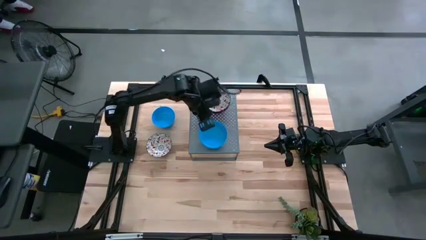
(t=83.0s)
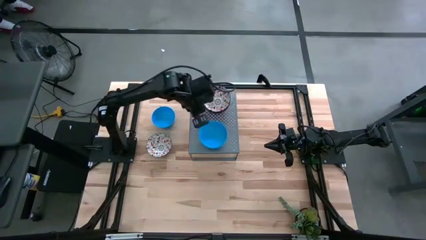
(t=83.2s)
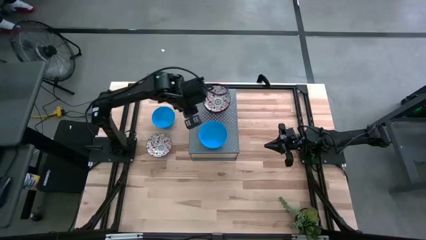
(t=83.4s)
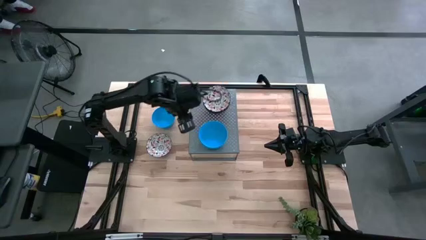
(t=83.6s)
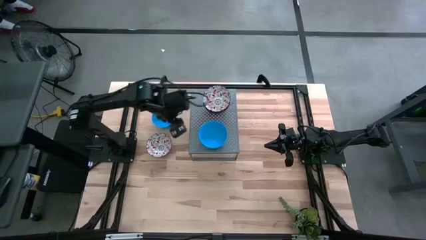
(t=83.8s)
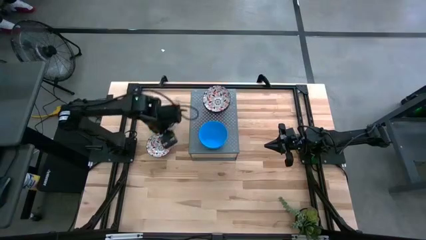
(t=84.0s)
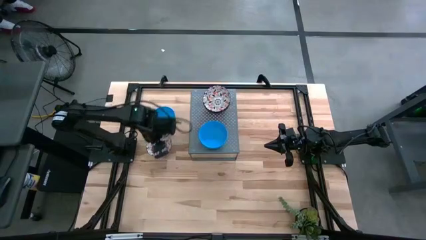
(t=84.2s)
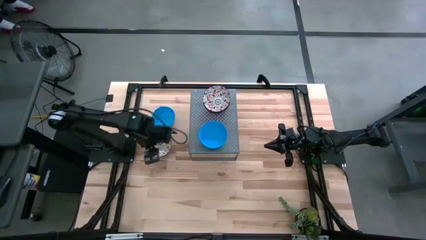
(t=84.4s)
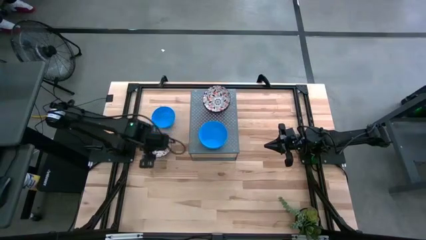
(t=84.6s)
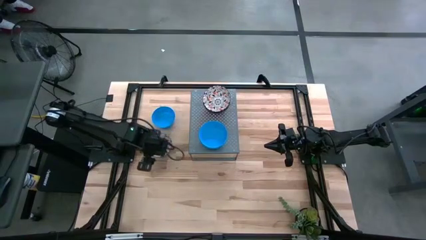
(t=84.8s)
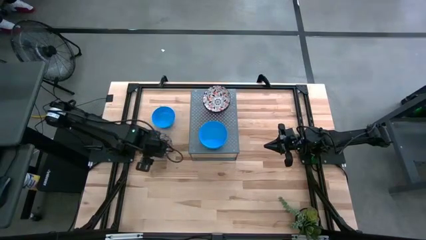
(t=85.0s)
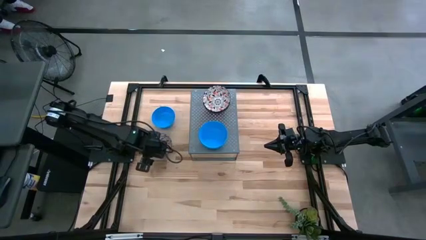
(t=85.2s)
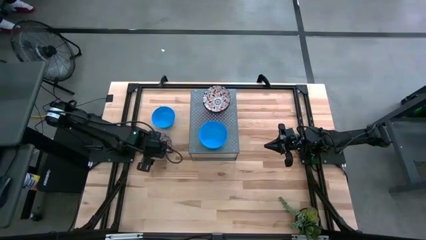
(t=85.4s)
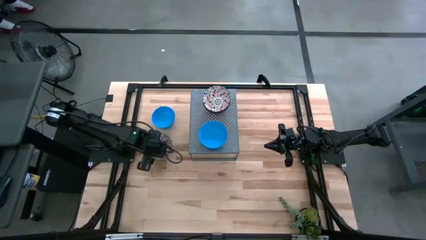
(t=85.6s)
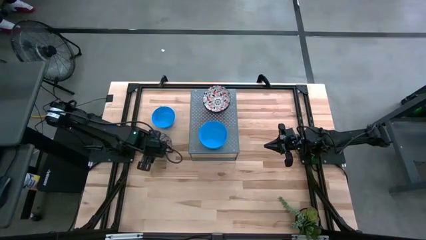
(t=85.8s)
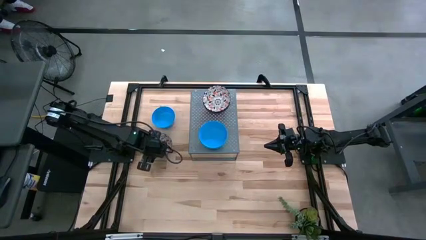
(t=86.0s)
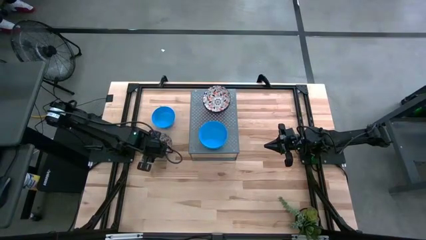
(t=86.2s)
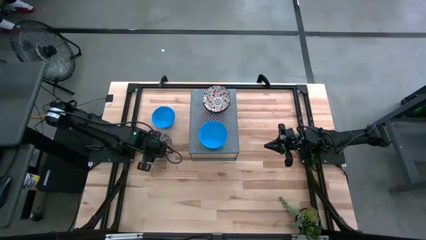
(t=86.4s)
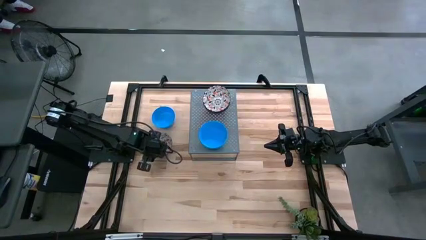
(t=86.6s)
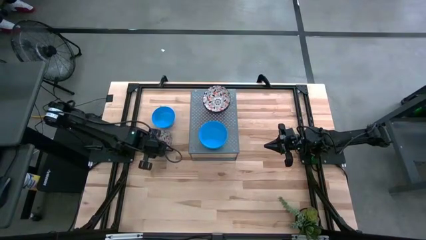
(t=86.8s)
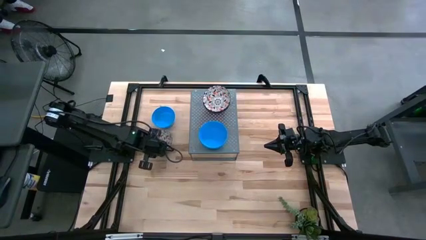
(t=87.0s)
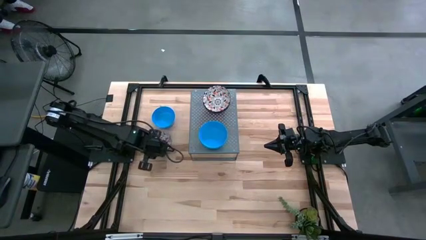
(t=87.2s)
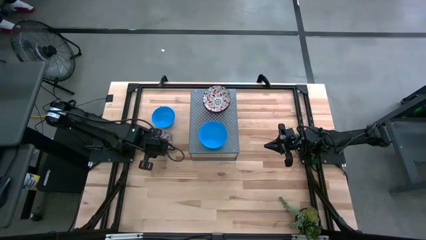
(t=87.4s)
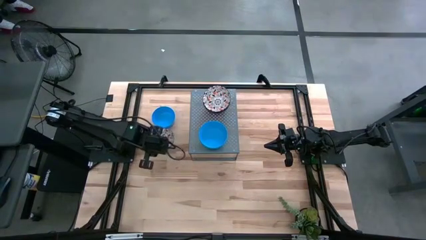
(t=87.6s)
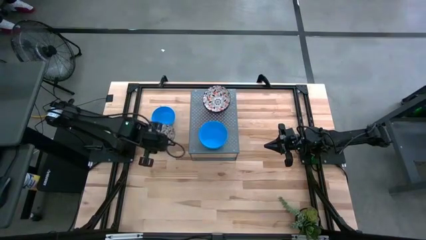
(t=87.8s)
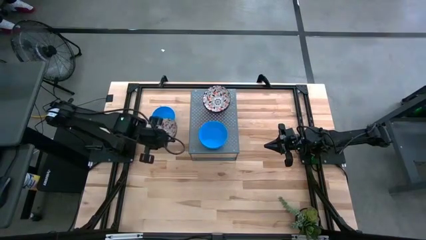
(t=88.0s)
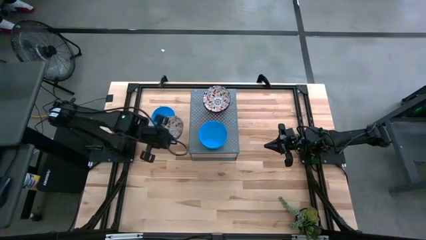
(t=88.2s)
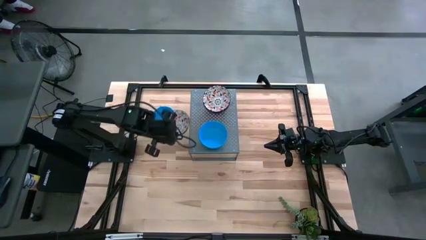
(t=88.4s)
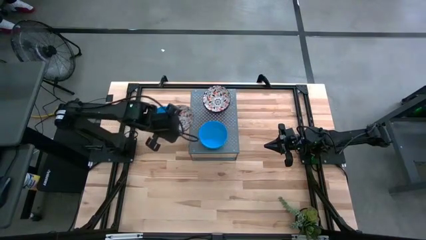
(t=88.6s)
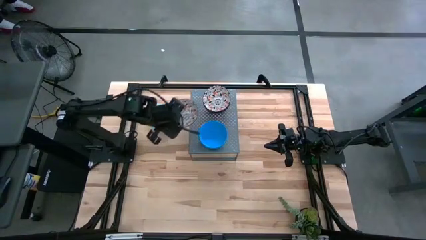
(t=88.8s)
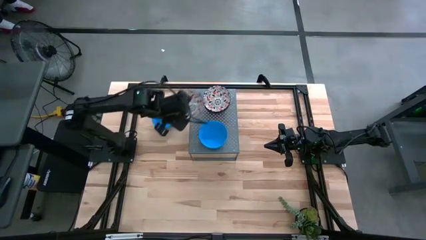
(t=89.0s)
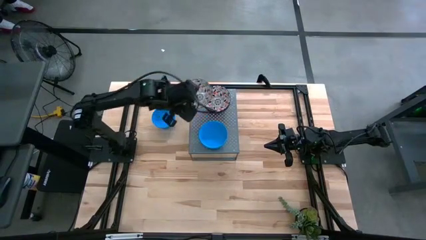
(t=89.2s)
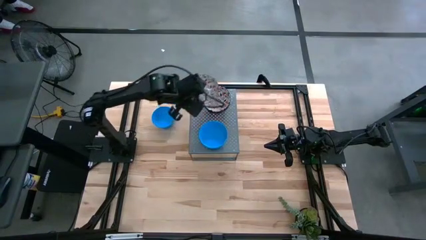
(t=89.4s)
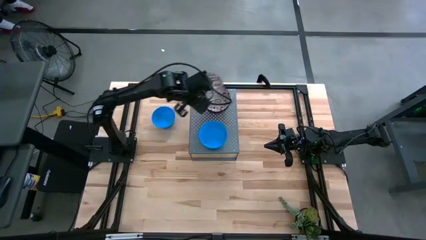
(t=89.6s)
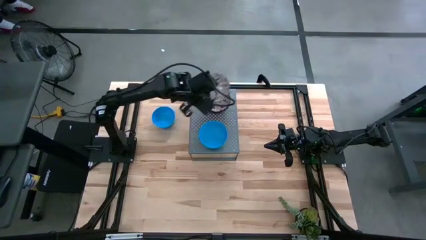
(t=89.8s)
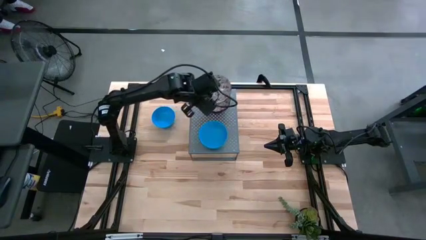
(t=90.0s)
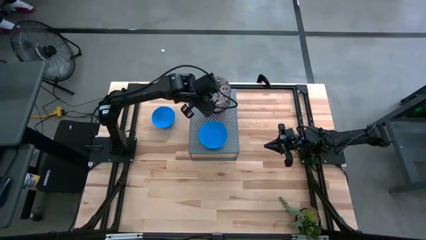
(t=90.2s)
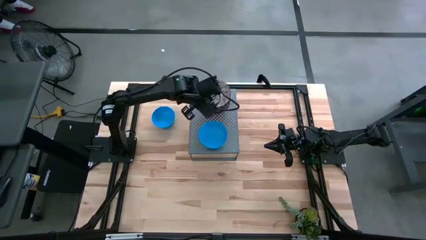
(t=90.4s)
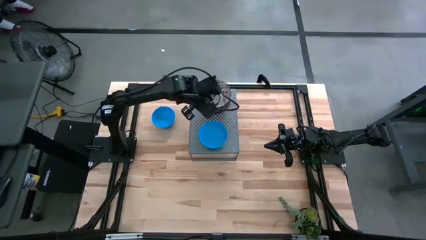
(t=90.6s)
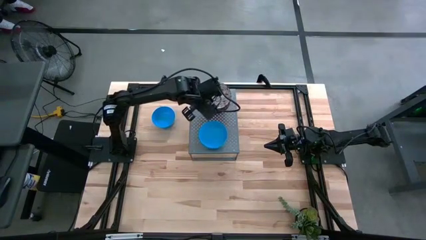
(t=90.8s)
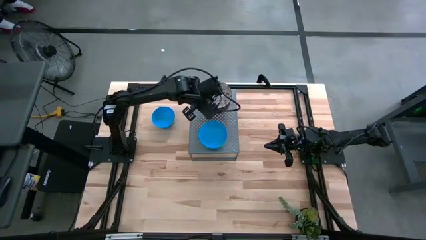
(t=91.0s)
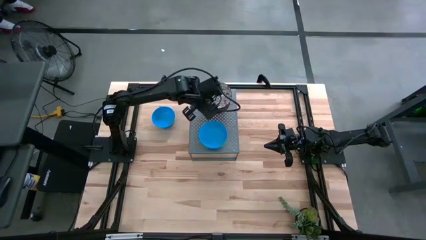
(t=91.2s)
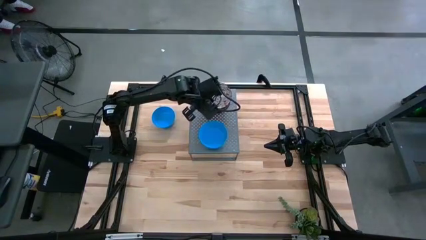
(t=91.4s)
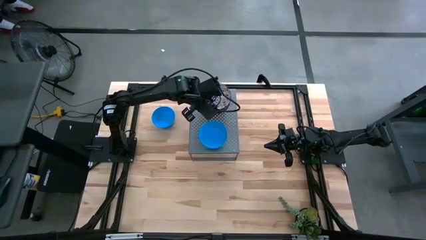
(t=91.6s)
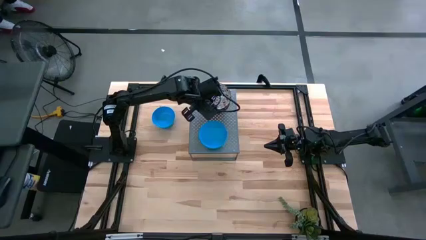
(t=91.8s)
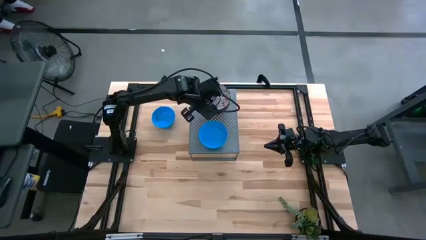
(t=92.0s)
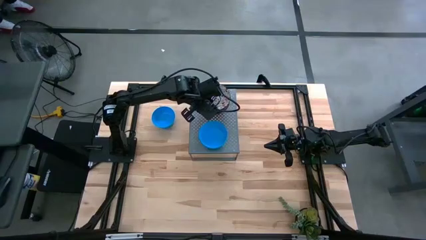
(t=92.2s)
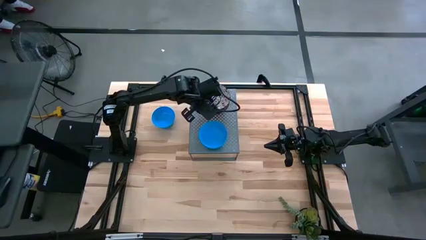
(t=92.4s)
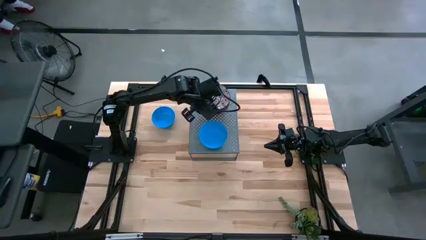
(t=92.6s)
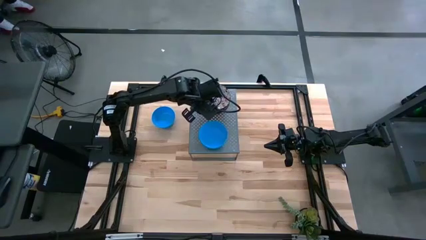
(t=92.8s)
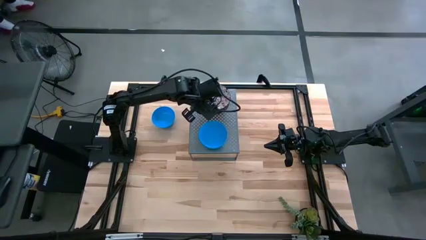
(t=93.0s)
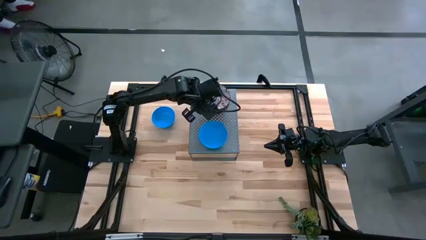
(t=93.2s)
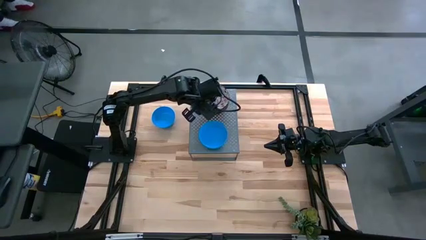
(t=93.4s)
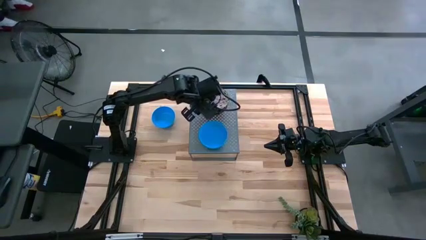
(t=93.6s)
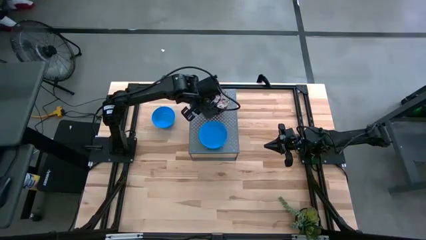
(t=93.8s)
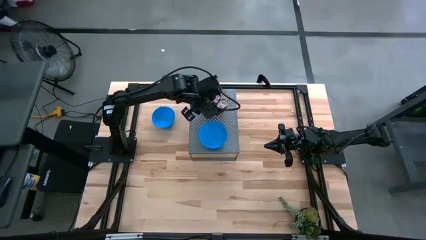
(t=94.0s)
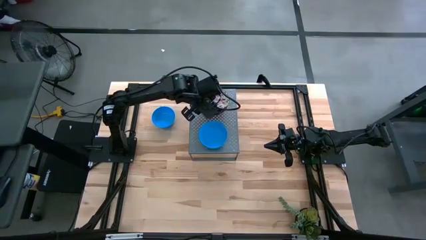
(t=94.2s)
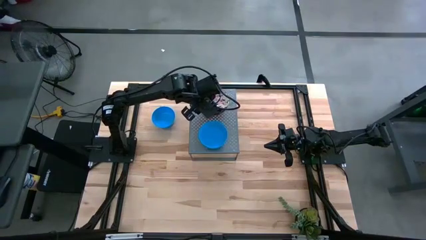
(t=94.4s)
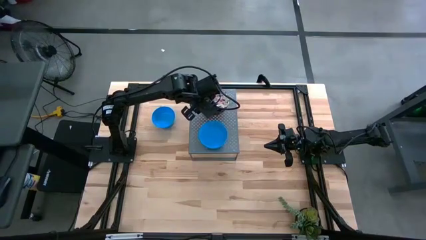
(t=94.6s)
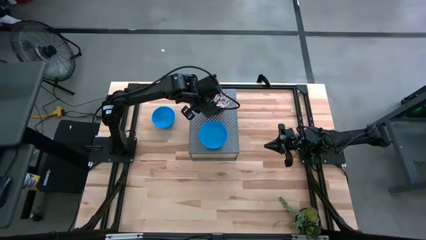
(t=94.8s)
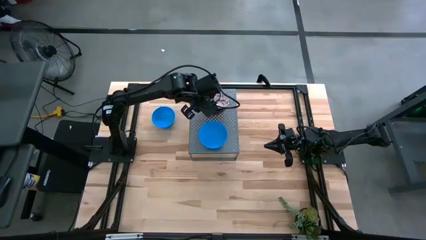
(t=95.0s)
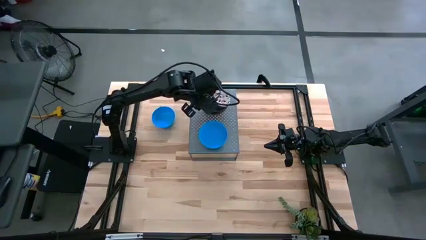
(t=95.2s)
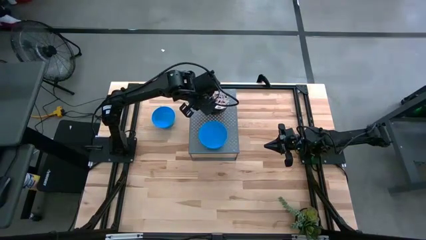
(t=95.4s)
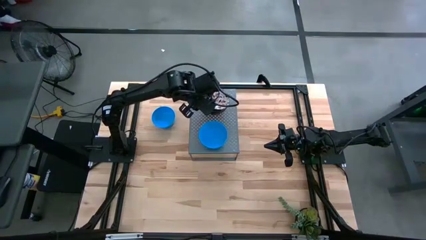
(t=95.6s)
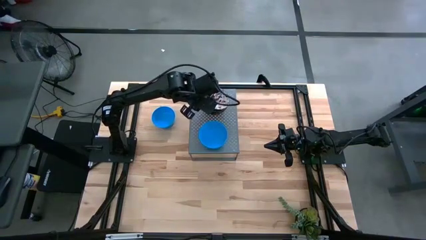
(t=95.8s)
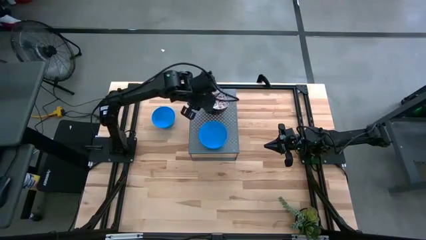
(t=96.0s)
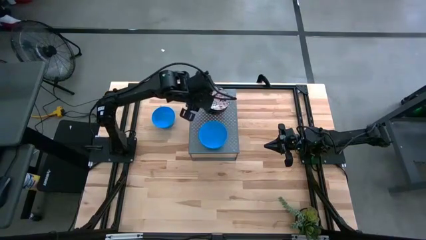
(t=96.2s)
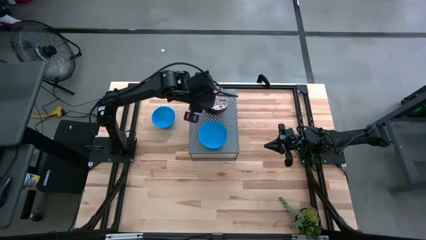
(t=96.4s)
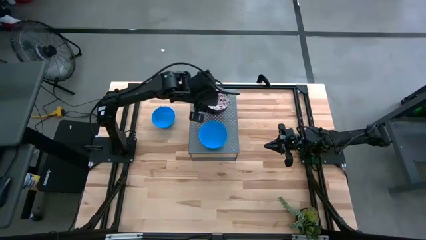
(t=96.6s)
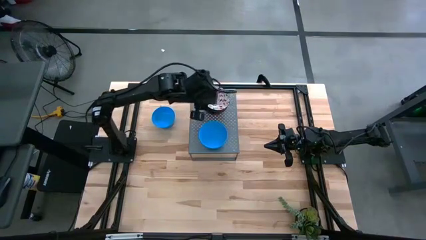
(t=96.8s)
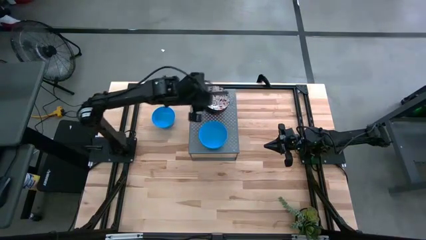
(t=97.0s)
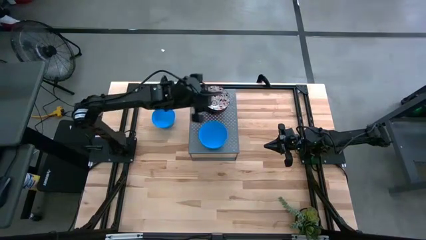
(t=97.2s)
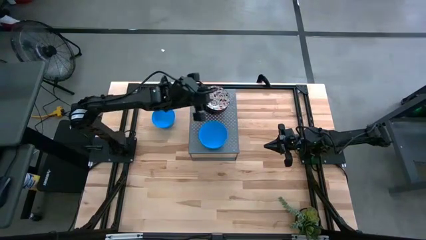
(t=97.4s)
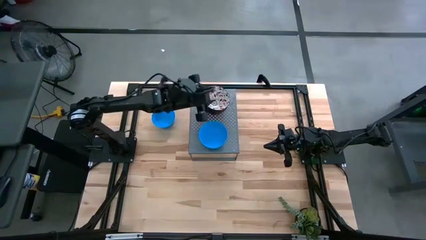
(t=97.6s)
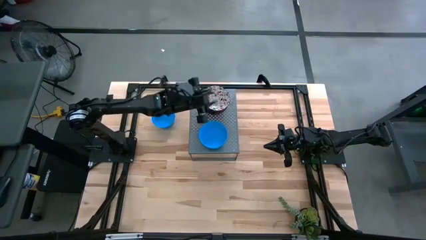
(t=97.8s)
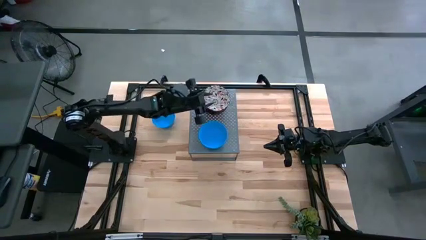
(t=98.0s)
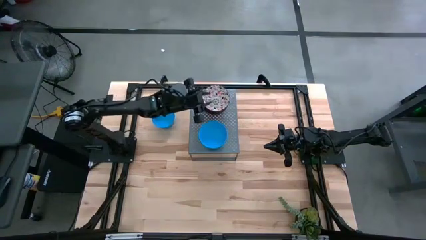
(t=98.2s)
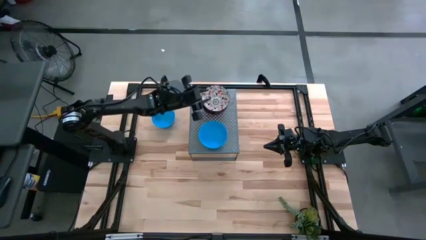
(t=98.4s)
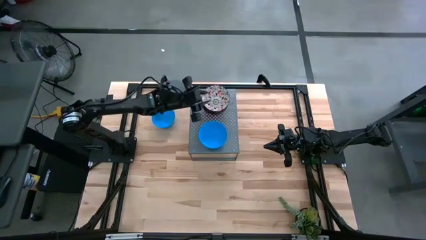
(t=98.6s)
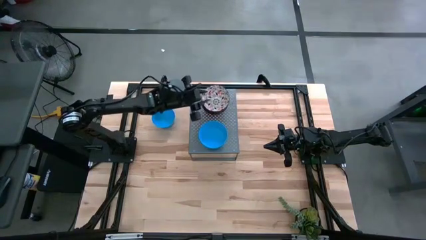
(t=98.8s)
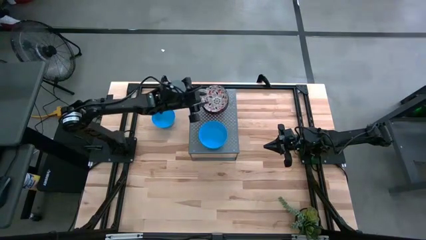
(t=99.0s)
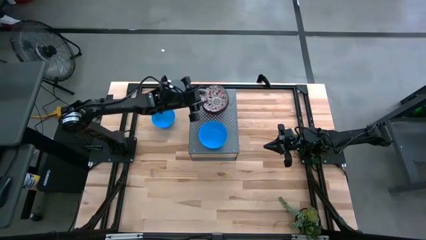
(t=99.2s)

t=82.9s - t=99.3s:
Task: Pick & Place Mini bowls
Stack the white patterned bowl on the white patterned bowls on the shelf
